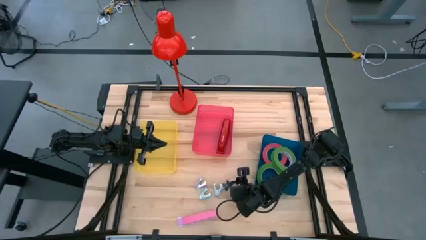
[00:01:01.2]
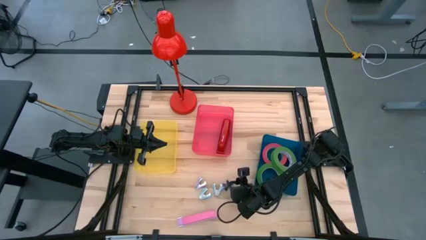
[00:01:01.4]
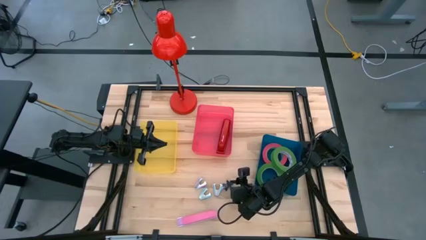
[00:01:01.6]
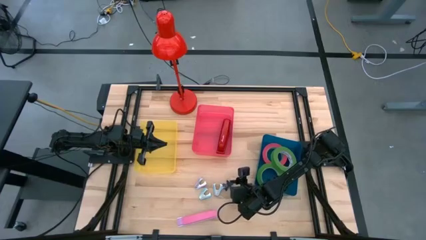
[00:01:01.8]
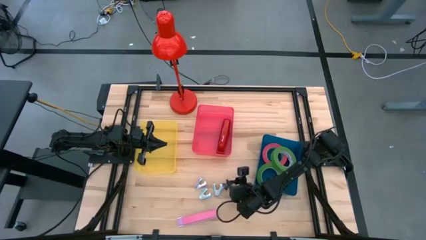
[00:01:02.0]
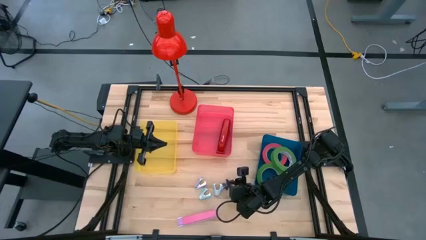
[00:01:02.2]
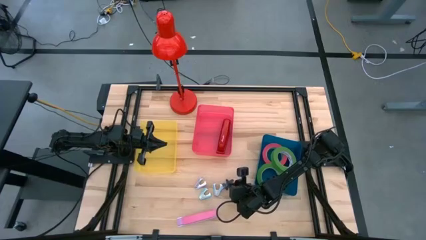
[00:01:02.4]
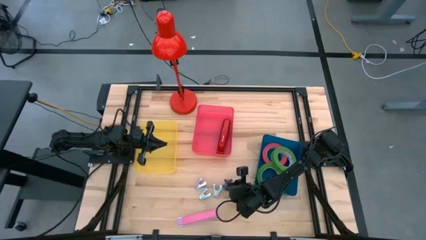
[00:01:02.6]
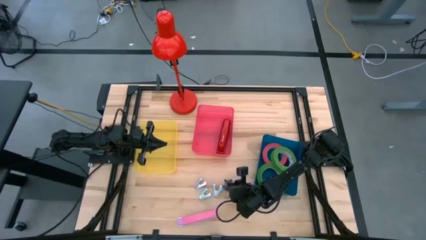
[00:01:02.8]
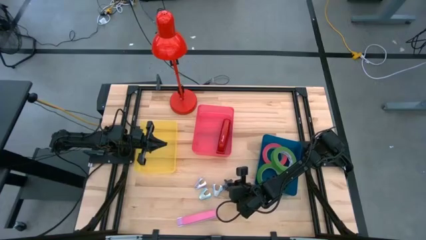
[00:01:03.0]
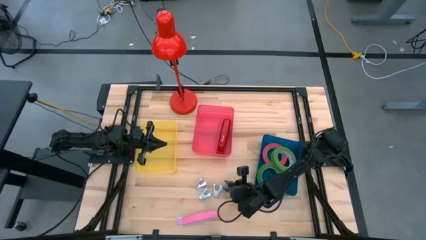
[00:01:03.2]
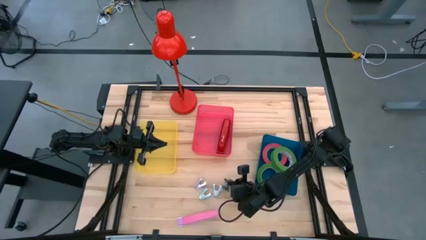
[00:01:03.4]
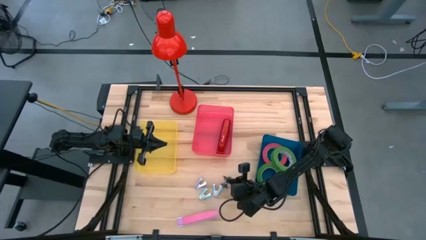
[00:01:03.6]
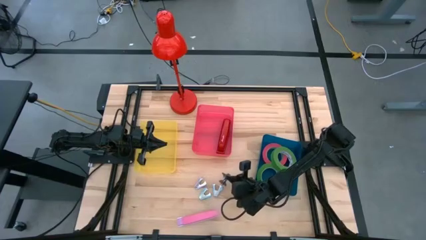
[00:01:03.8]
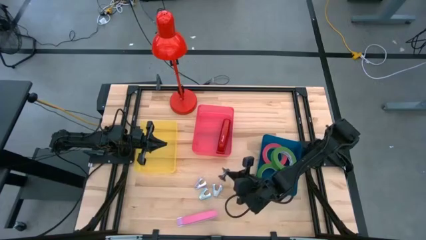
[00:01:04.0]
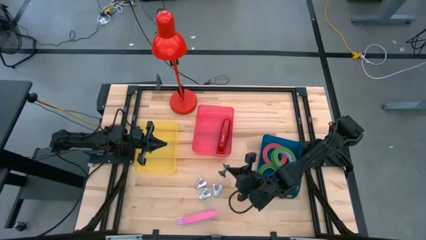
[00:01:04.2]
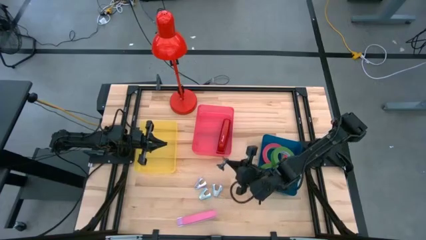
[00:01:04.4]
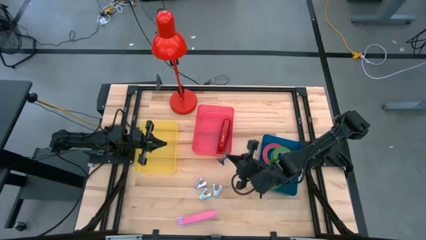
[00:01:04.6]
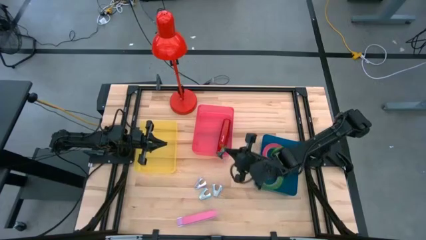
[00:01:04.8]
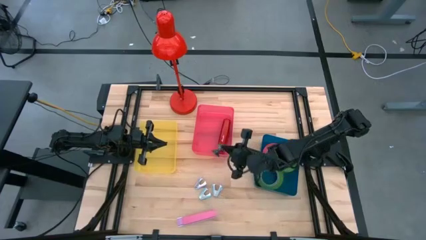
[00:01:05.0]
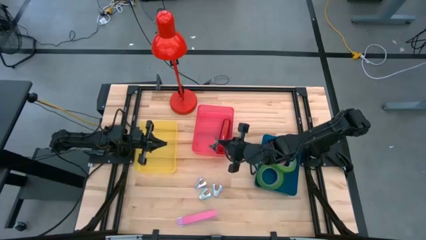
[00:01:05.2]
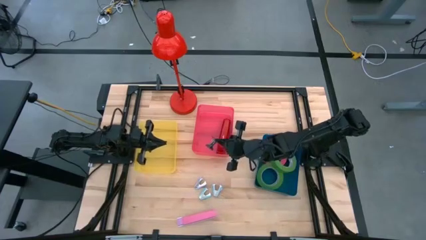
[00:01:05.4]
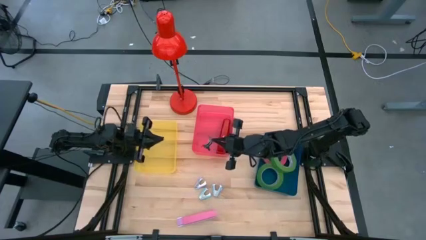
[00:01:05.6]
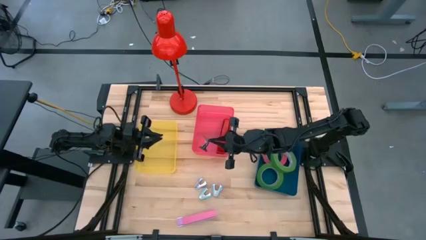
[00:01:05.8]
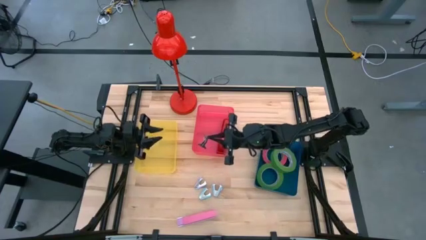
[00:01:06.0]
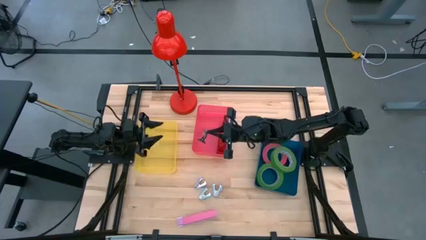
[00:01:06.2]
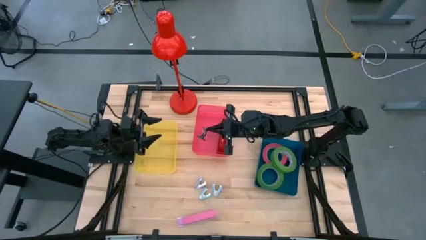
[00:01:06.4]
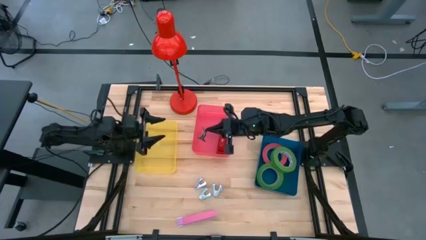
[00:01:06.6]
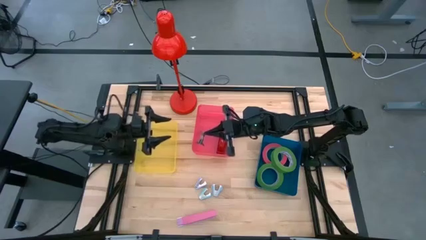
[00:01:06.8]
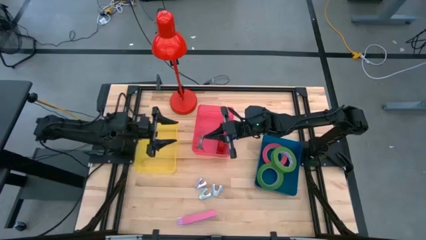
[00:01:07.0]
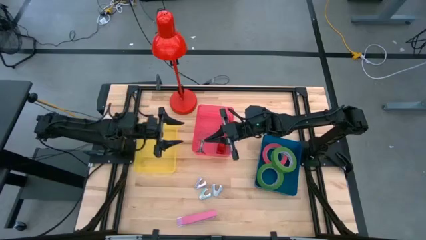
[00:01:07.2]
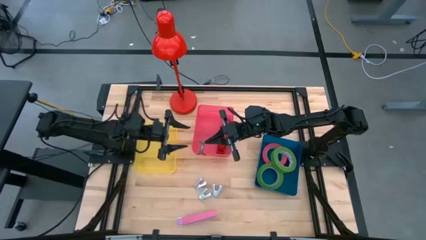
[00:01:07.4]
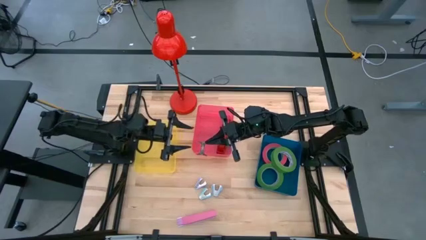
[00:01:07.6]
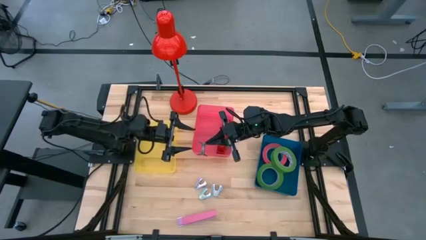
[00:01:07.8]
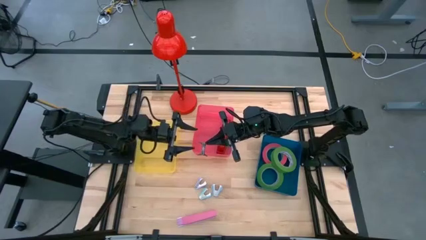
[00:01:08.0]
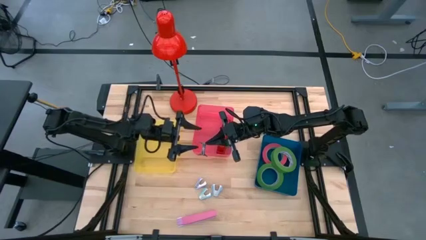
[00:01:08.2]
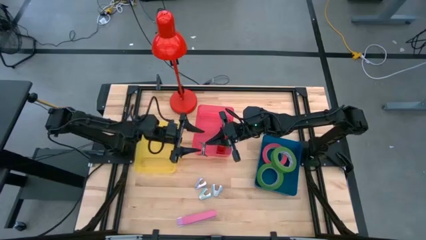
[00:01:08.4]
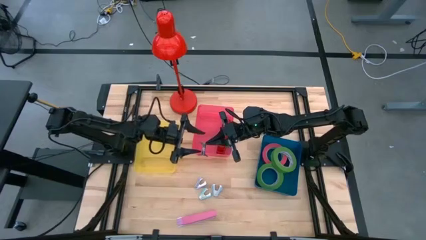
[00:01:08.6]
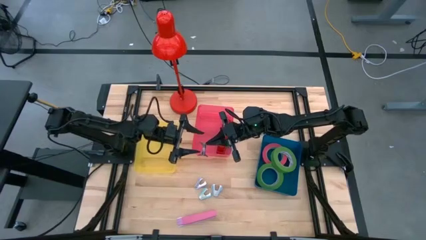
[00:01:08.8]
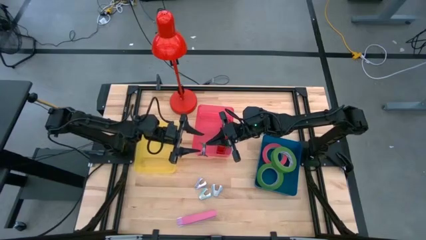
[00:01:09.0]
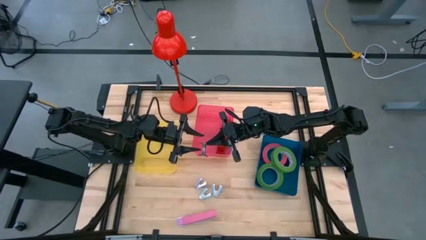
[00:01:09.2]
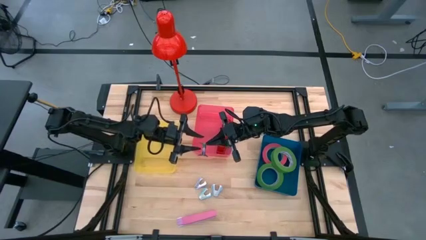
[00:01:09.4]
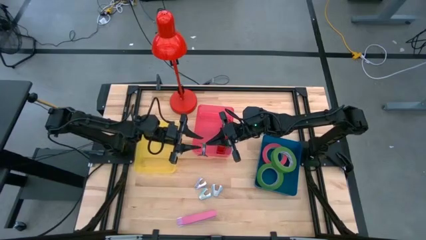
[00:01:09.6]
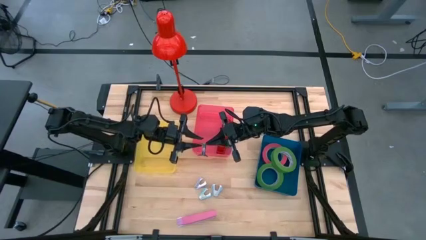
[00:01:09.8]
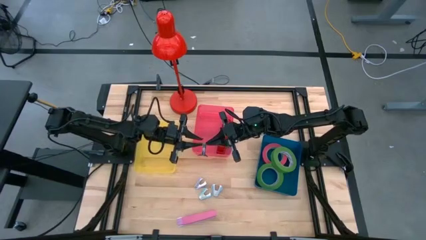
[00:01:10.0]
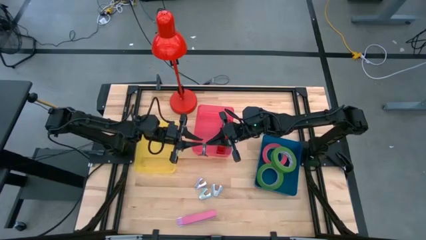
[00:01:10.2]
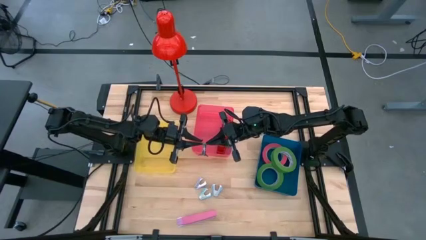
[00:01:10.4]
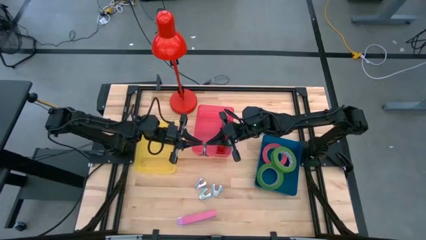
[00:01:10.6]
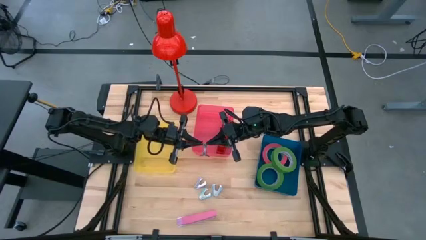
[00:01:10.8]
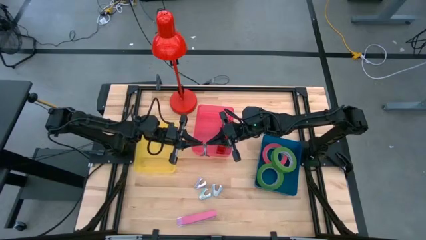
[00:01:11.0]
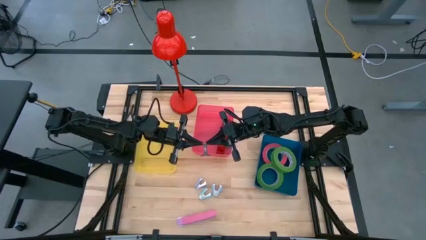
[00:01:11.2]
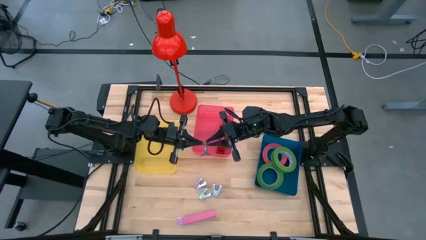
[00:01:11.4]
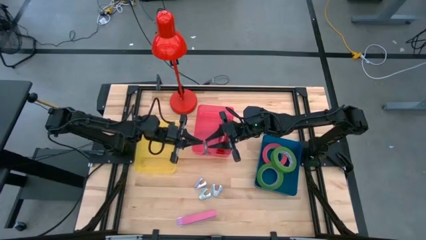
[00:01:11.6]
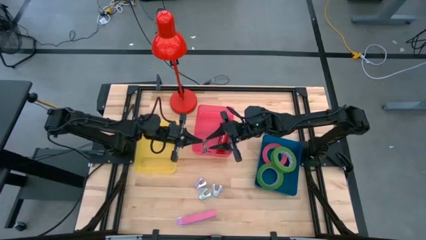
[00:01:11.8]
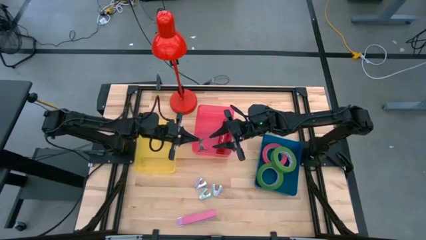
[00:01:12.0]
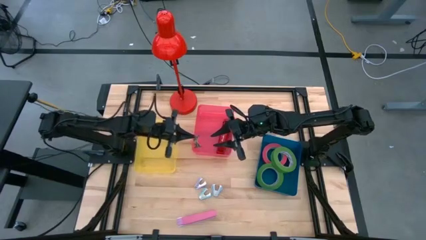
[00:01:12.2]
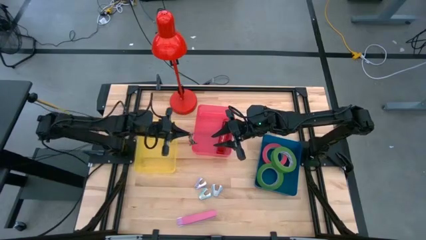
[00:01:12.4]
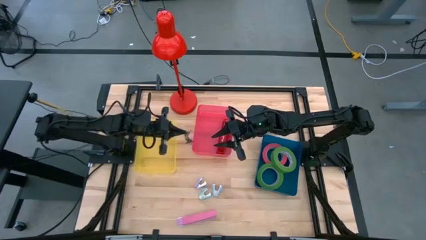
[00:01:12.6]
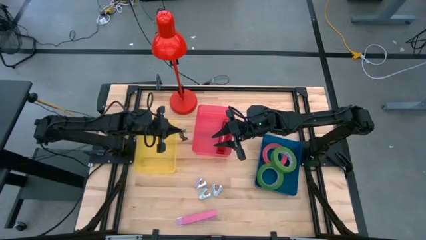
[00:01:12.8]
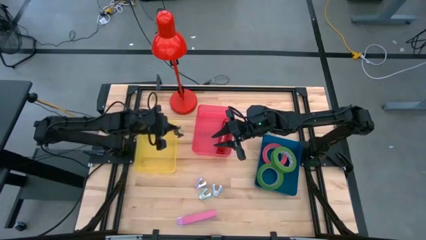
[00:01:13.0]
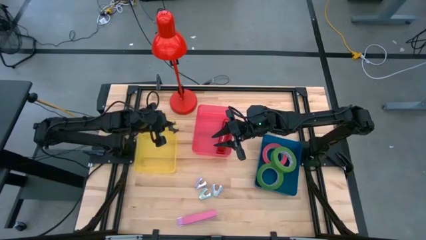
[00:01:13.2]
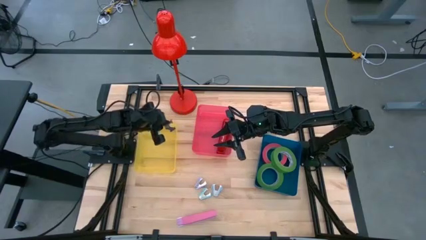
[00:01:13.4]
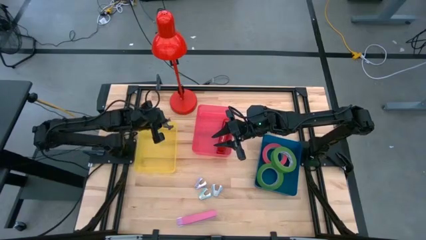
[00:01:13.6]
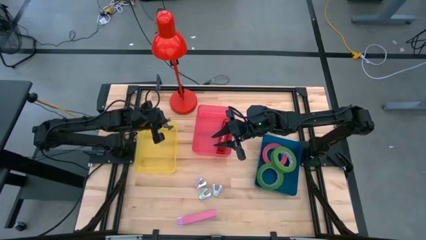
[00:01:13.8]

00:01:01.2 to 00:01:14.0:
Task: Pick and place Stapler, Stapler remover, tape
Put the black staple remover into the yellow bin

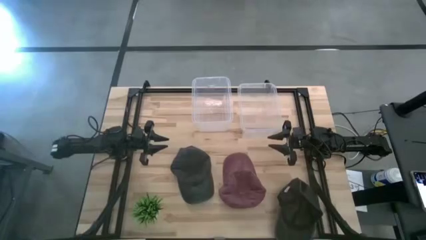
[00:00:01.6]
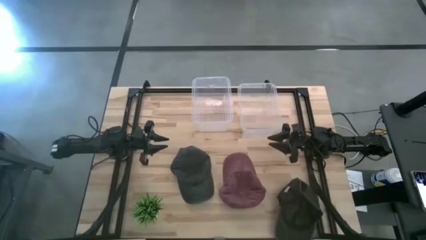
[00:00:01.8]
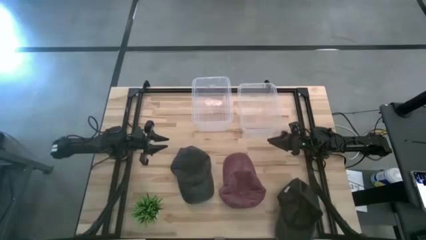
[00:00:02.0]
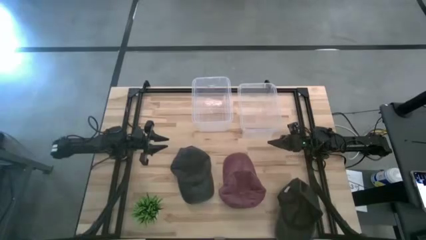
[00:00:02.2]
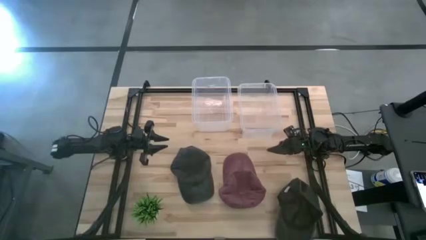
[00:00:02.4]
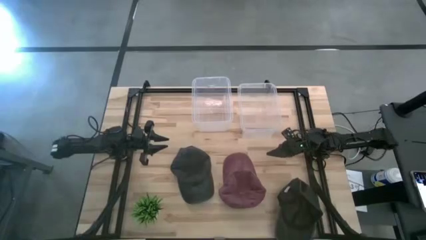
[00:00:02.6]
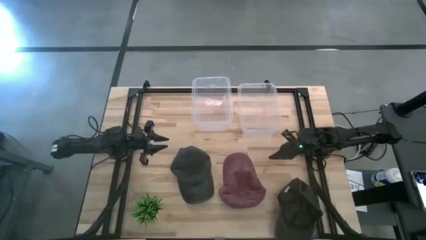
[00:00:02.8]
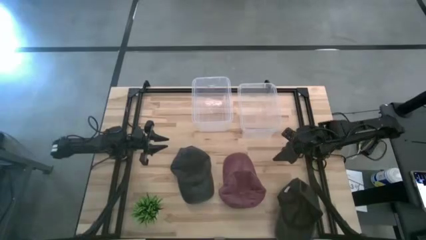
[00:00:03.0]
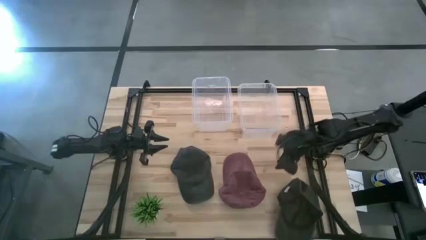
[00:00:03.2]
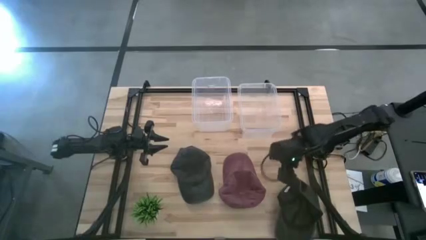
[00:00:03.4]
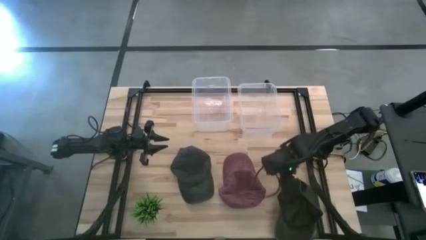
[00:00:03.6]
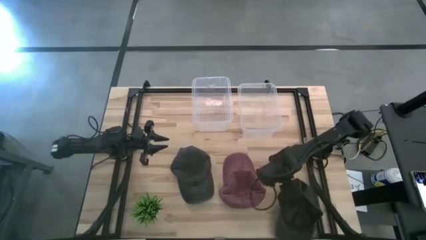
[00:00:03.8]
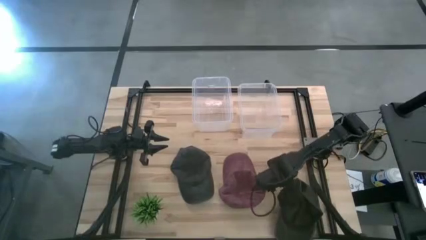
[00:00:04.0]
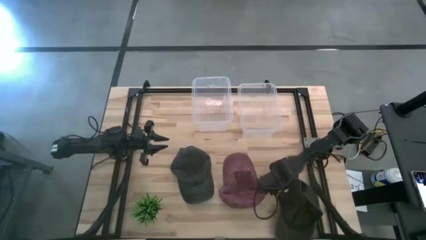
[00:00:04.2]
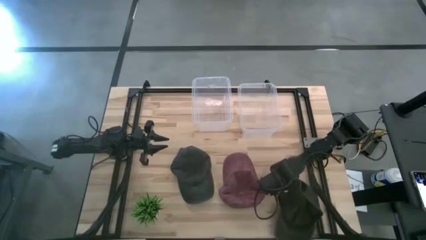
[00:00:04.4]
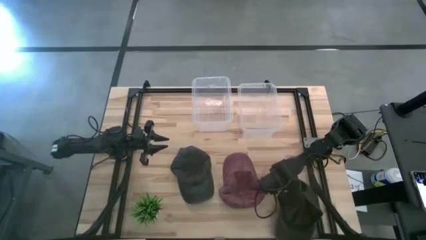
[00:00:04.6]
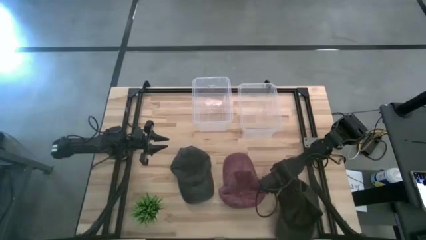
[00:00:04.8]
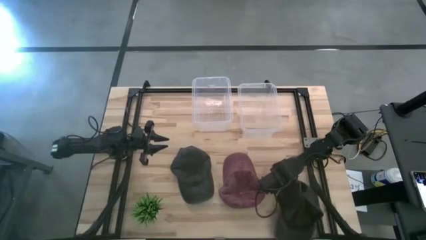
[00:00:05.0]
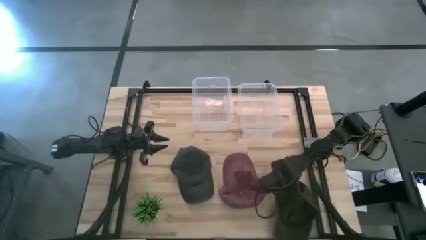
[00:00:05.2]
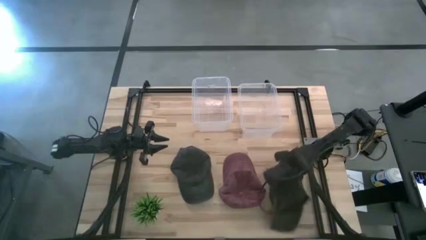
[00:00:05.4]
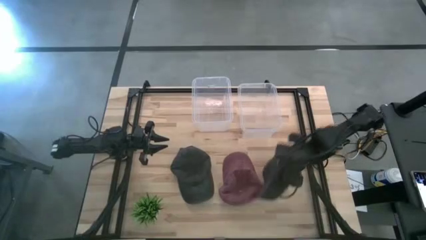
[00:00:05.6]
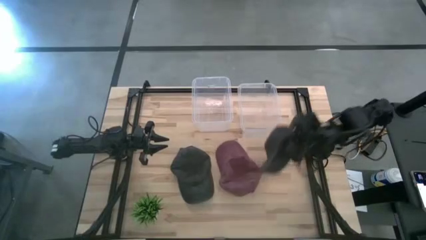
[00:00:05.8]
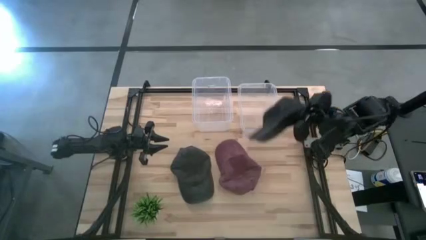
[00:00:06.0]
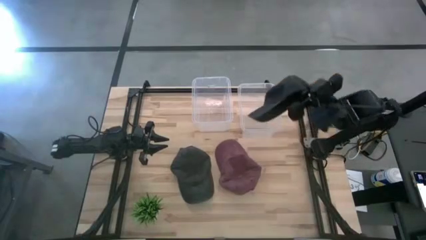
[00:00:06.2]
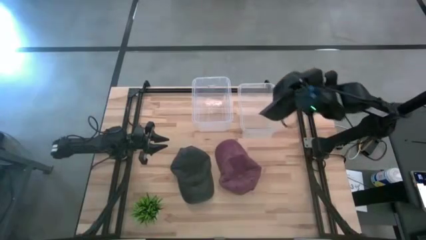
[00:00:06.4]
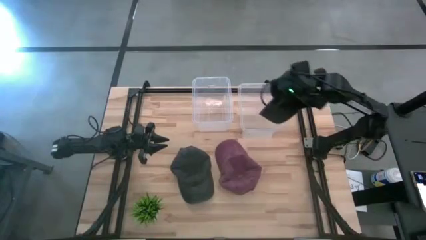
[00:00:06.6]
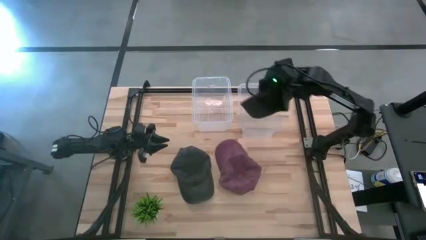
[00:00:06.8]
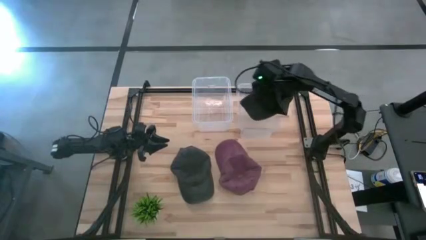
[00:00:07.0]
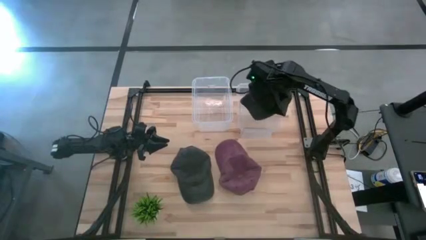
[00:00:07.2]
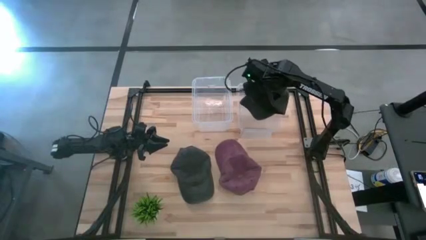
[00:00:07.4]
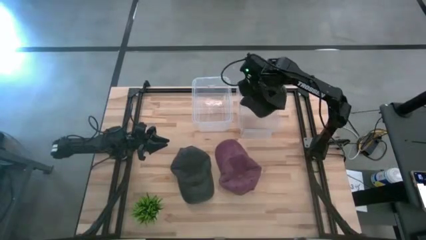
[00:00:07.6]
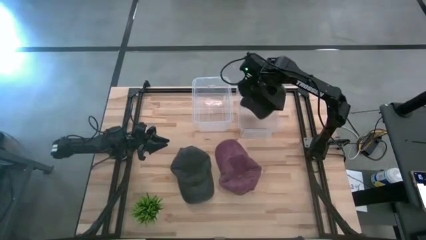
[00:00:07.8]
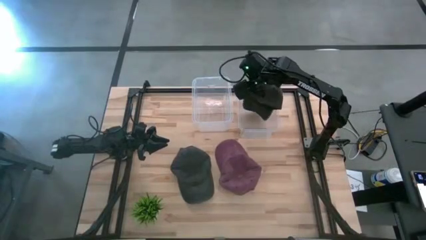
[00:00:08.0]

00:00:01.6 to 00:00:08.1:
Task: Pick & Place hat
Put the bottom black cap into the right transparent bin
